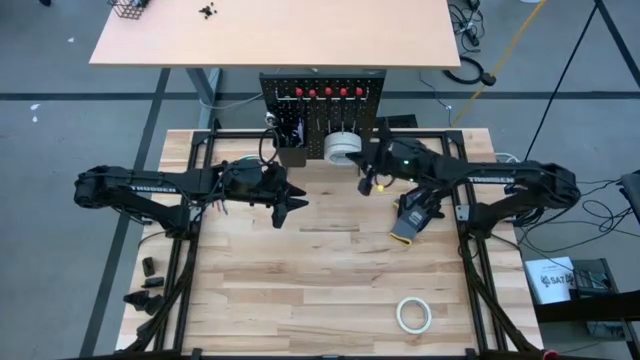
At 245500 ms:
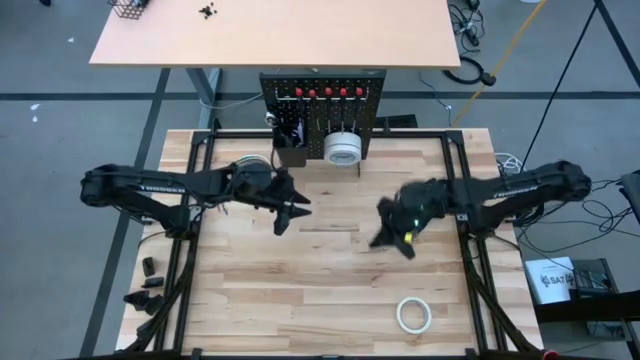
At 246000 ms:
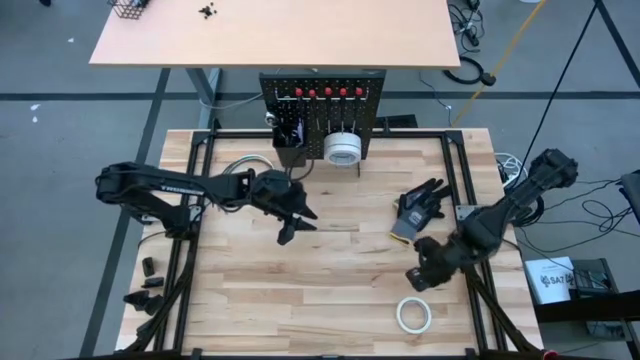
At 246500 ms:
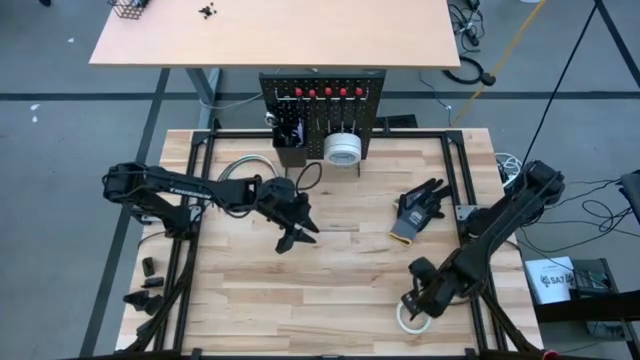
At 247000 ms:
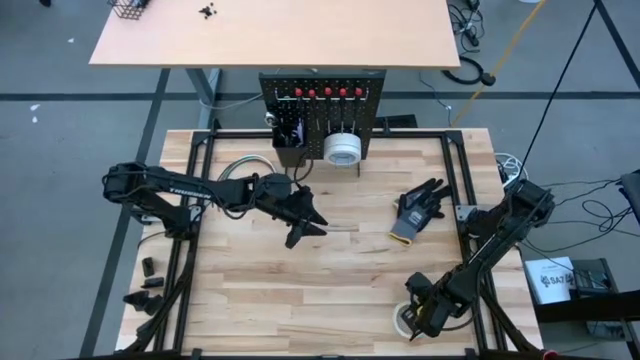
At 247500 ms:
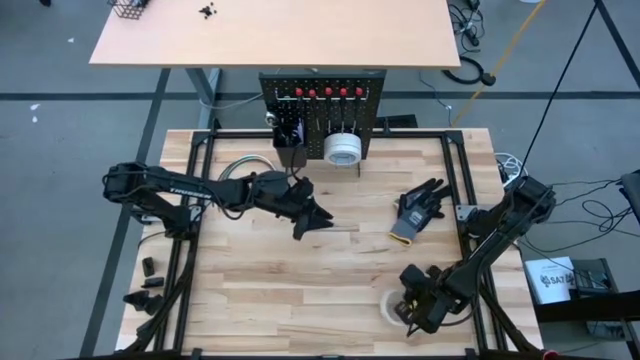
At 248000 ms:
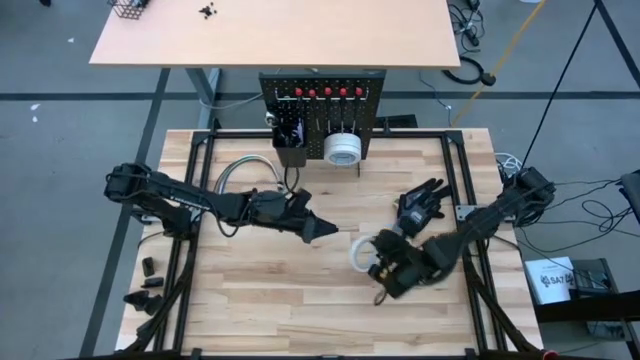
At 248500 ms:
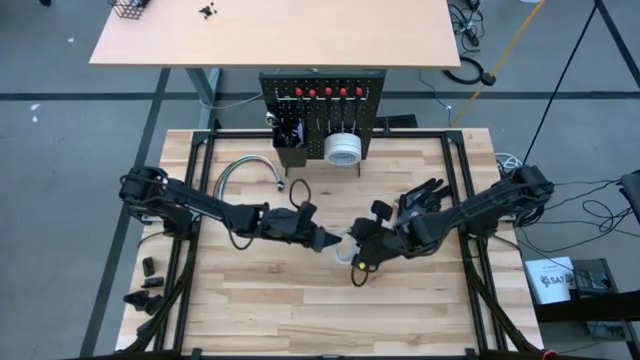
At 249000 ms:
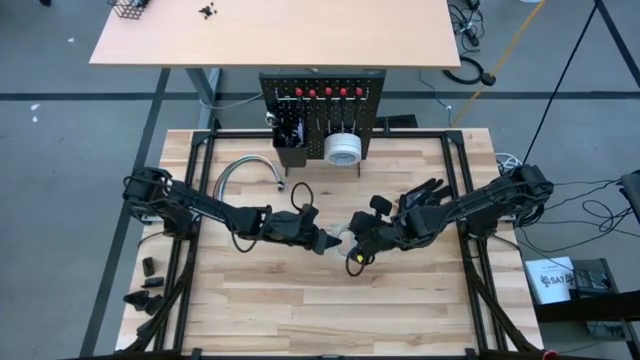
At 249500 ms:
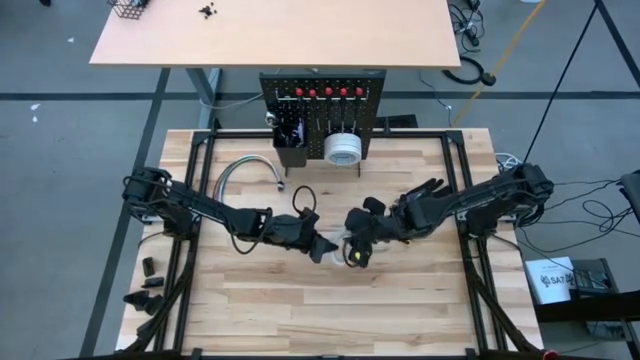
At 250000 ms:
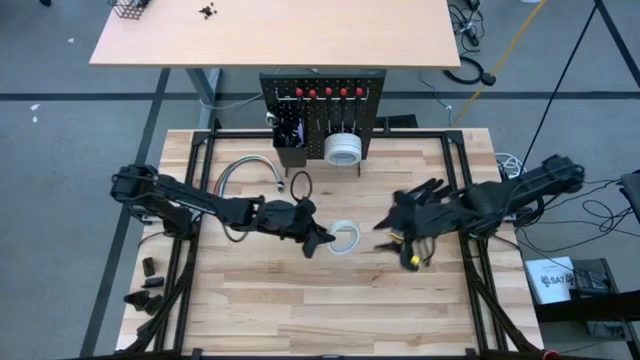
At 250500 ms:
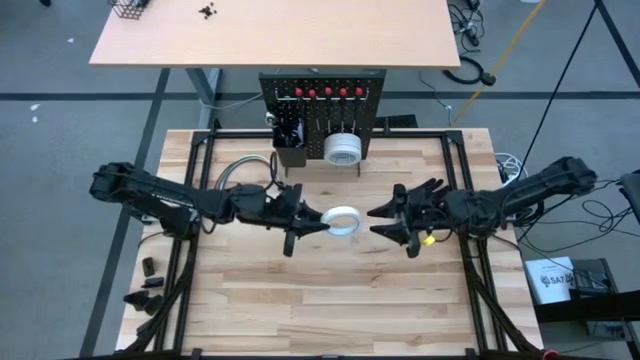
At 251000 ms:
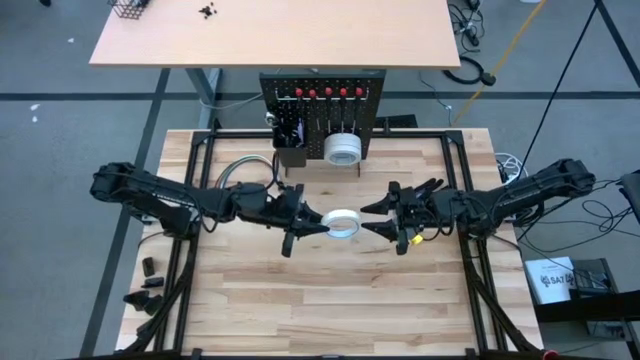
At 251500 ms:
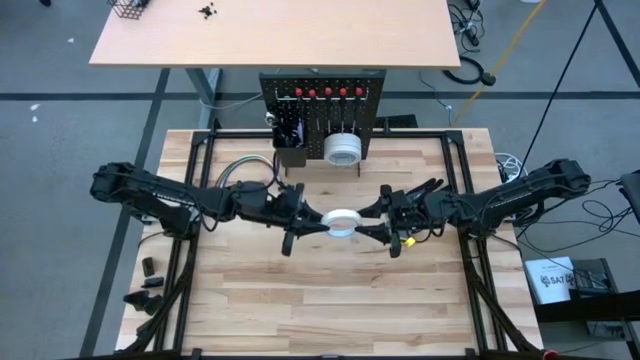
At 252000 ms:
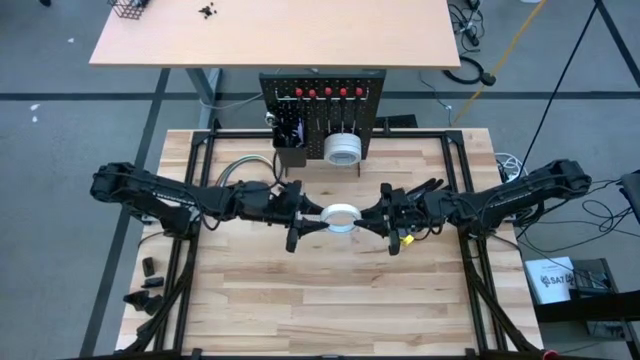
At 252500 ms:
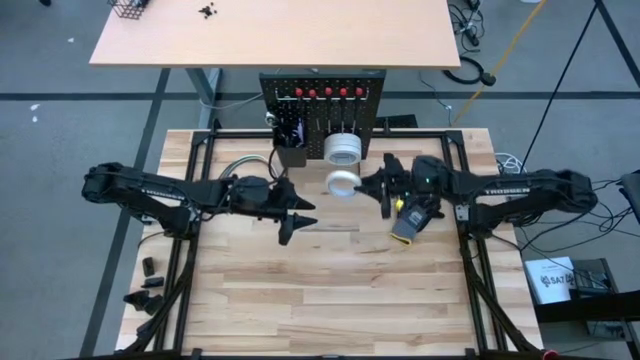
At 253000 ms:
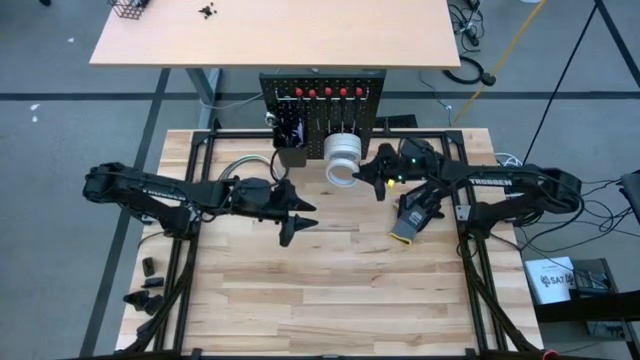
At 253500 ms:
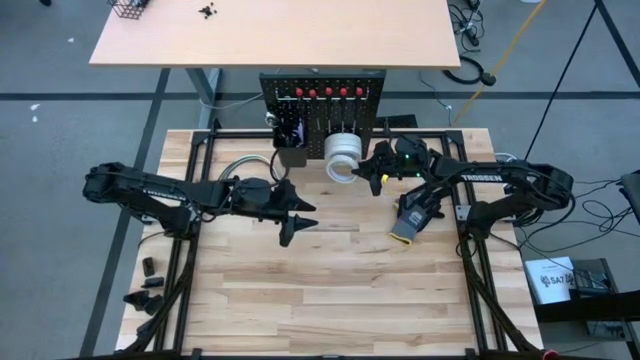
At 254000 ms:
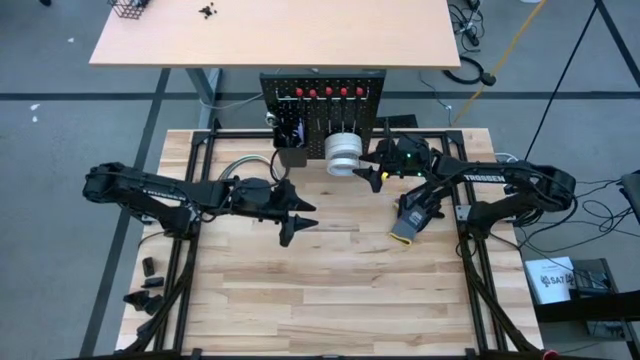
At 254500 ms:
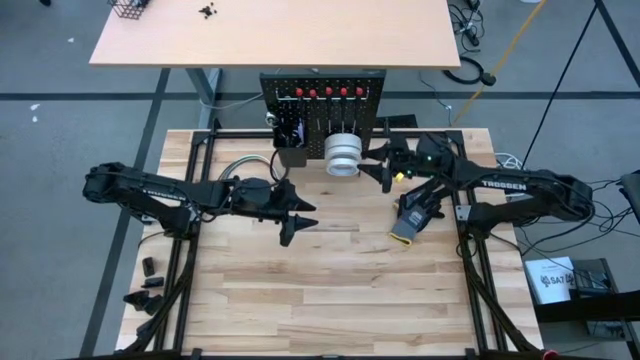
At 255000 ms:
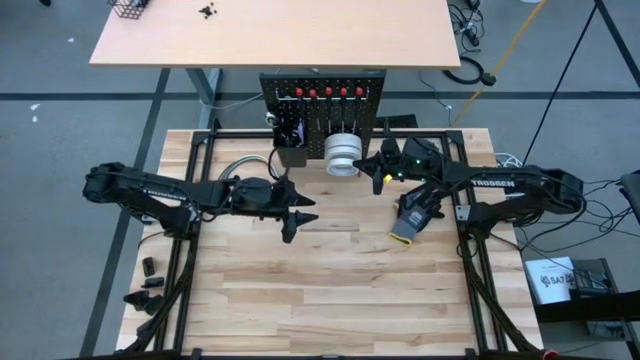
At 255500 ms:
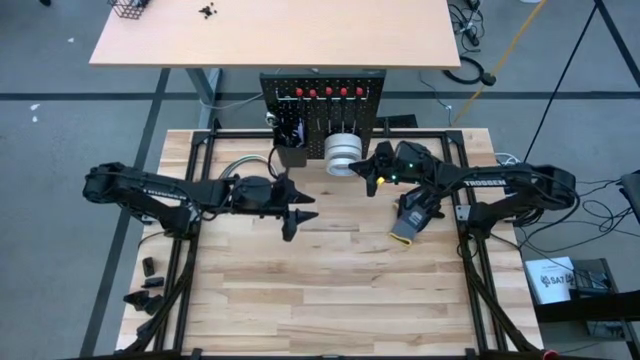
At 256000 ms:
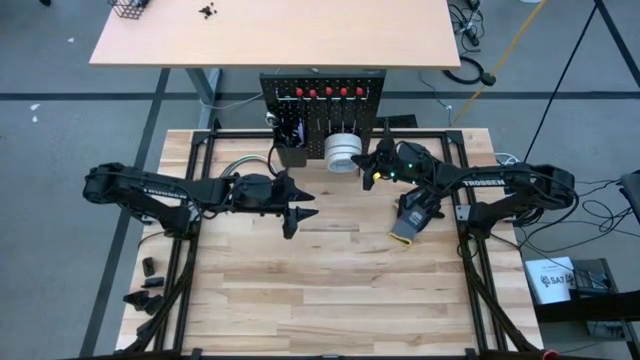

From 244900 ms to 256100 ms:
Task: Hang tools onto peg board
Hang the white tape on the peg board

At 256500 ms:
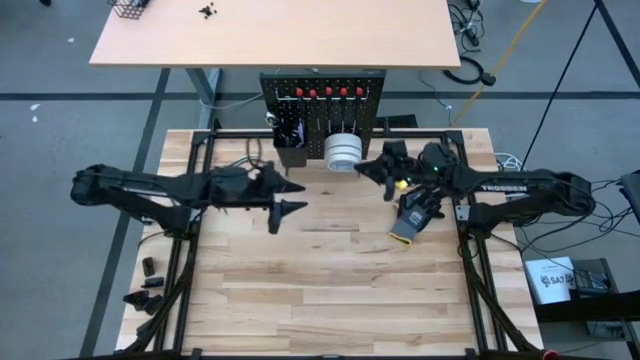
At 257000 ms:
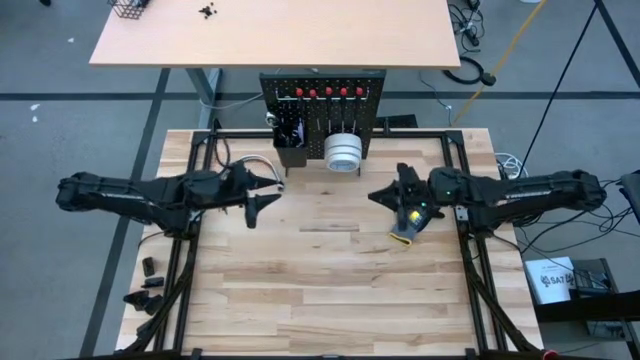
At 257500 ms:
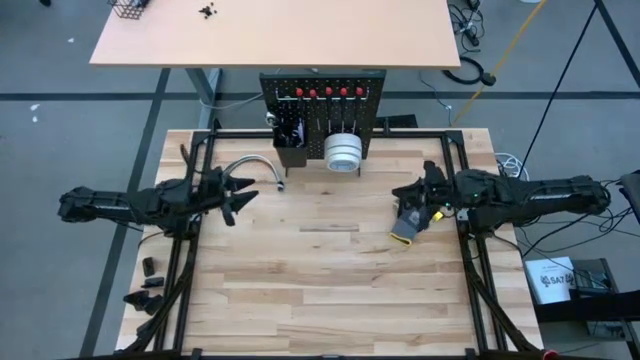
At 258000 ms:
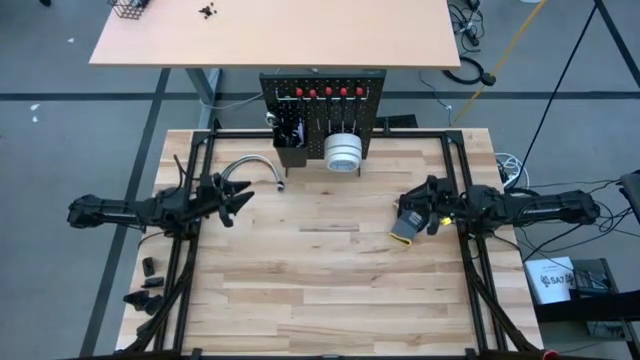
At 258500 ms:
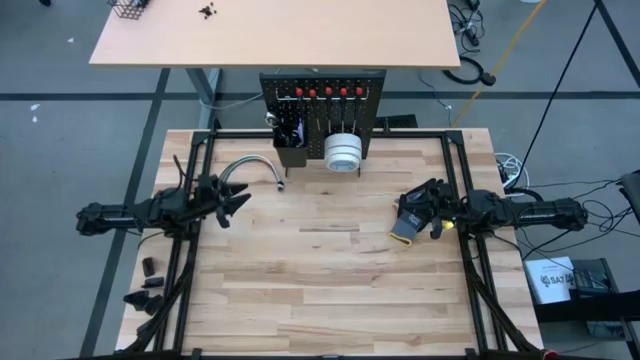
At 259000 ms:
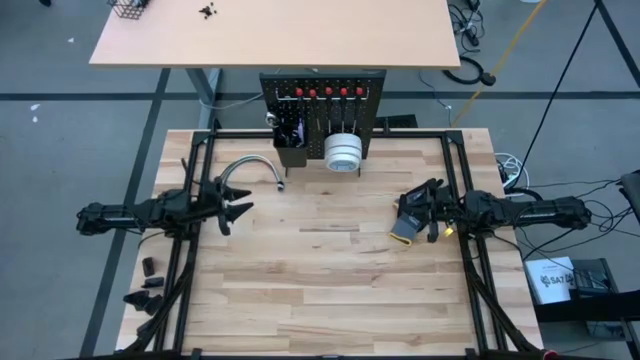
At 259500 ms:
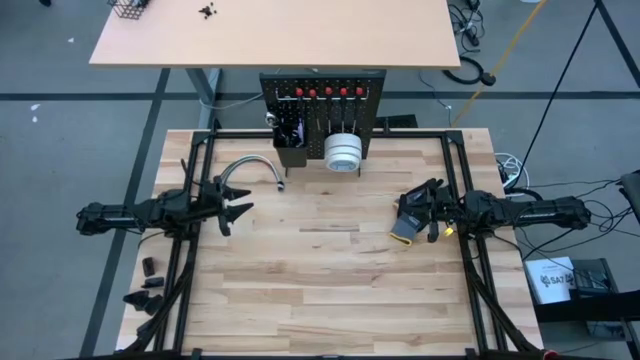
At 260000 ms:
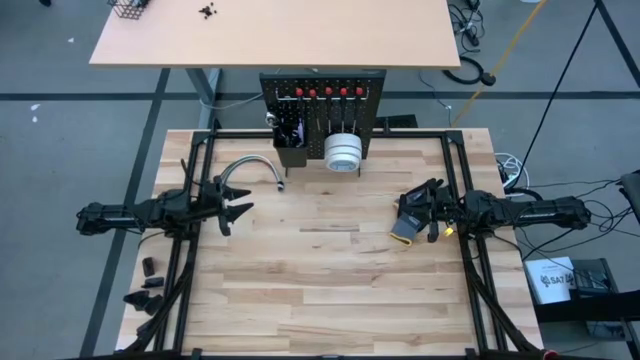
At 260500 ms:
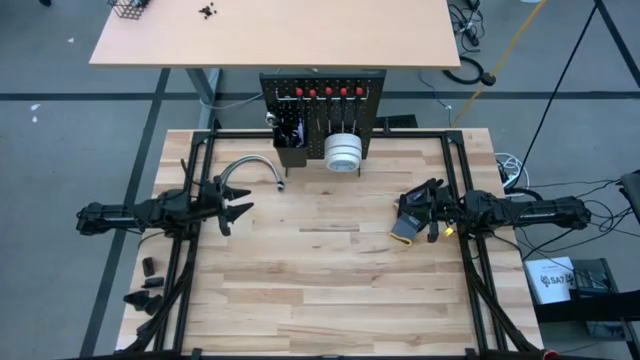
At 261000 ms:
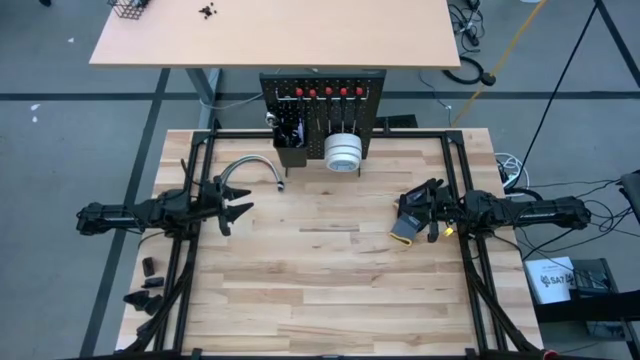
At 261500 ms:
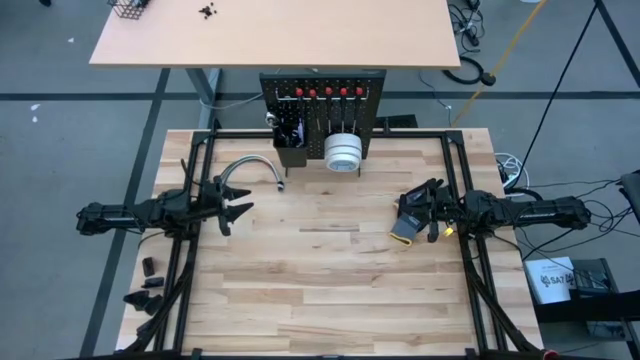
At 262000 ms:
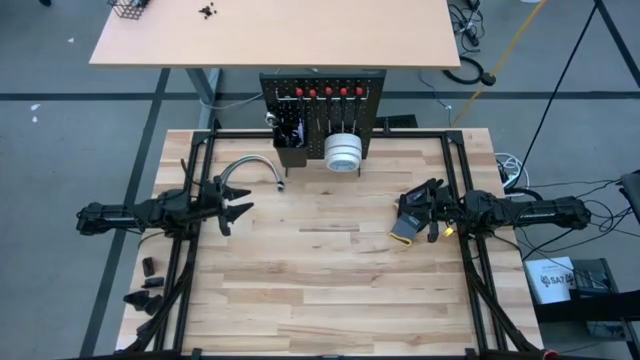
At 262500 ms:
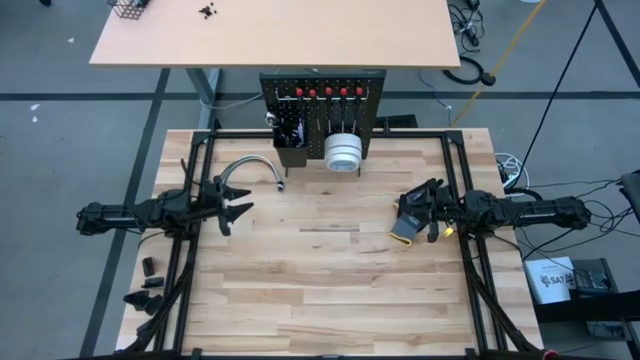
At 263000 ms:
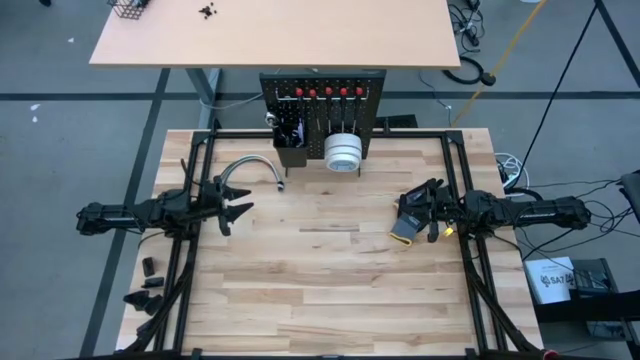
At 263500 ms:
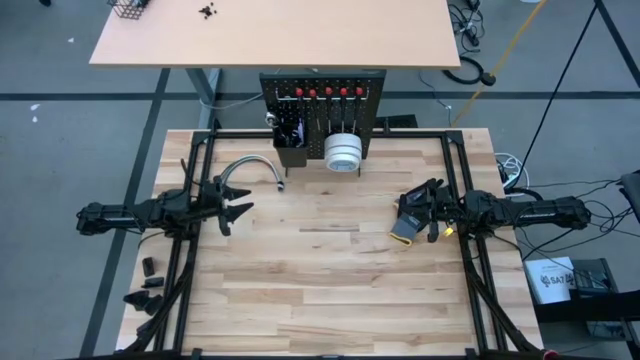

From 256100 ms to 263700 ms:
Return to Home Position

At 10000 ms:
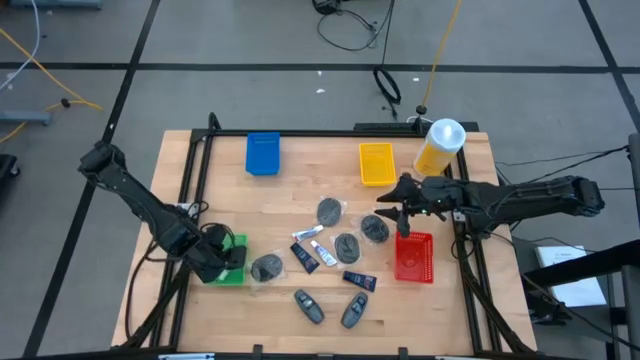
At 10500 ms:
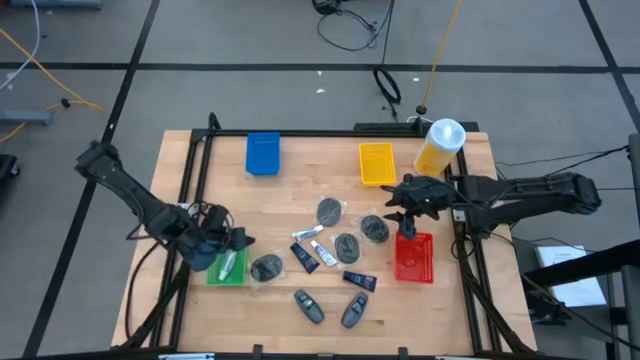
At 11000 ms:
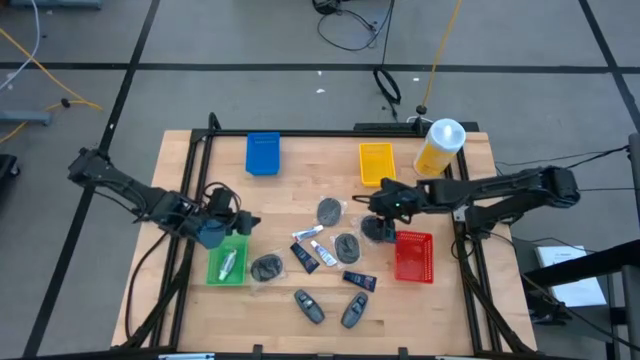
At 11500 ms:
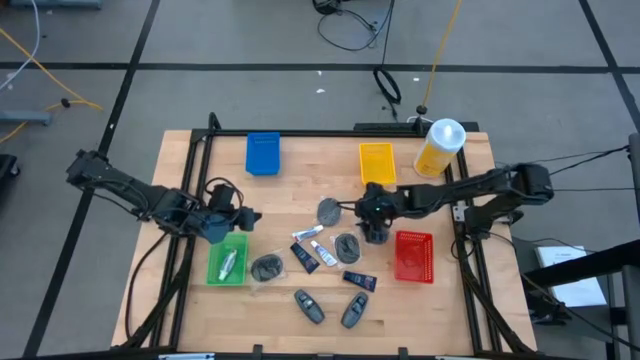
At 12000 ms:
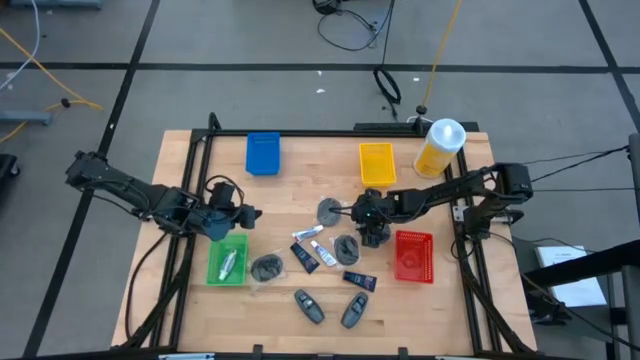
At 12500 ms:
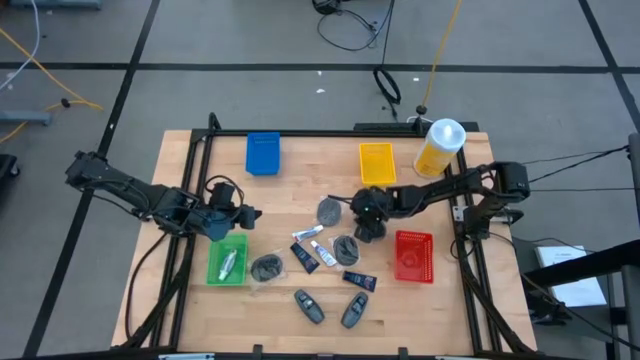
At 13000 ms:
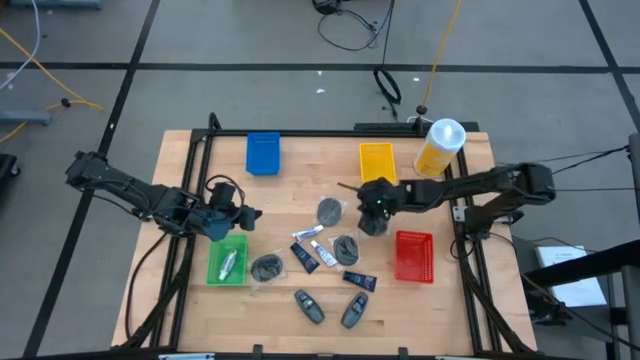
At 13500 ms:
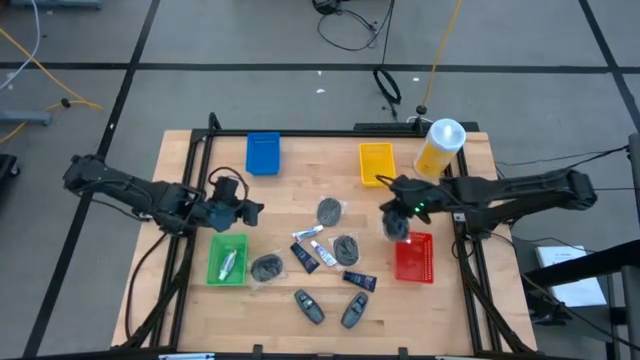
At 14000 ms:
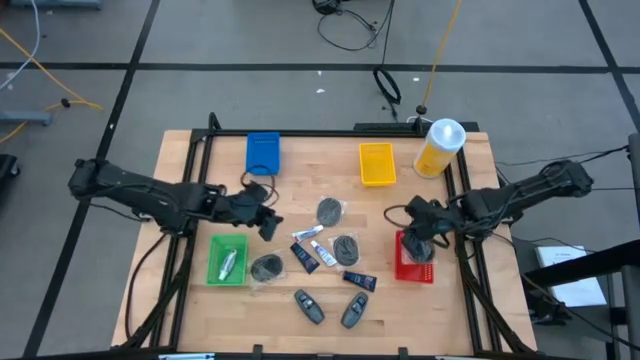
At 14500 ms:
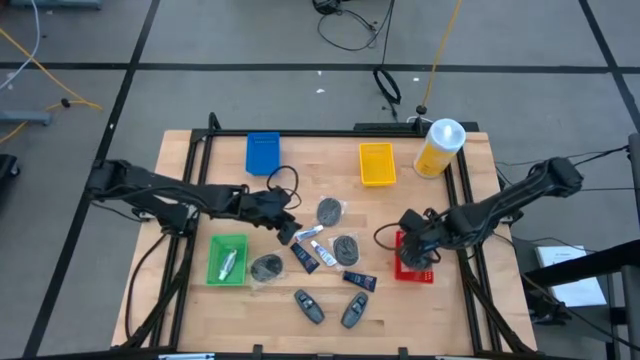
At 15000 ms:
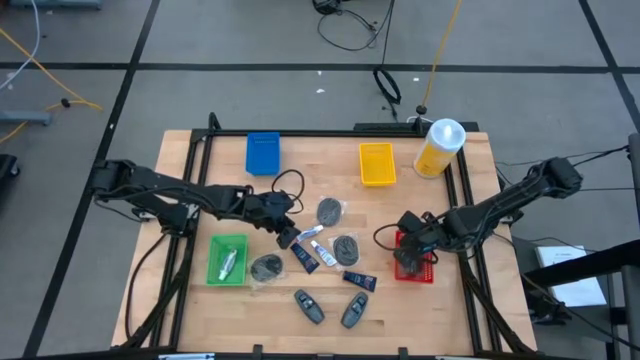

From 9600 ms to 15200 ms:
Task: Pick & Place Travel size toiletries
Put the black hairbrush into the red bin
